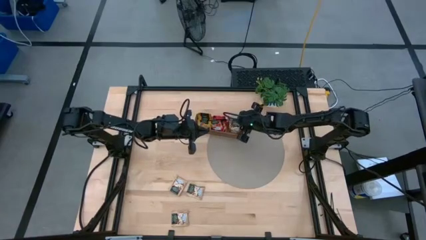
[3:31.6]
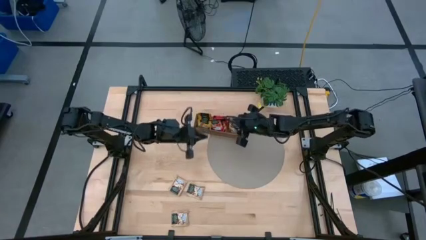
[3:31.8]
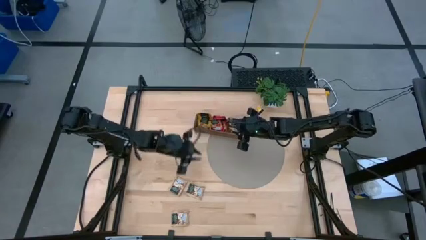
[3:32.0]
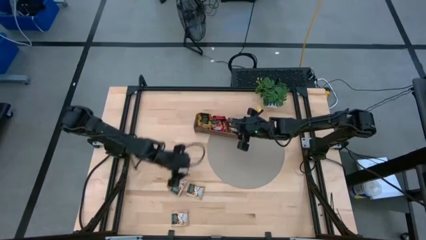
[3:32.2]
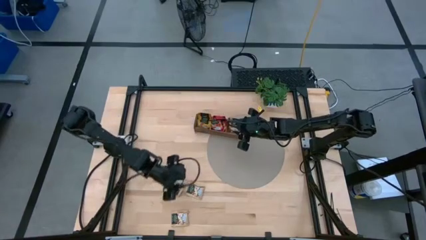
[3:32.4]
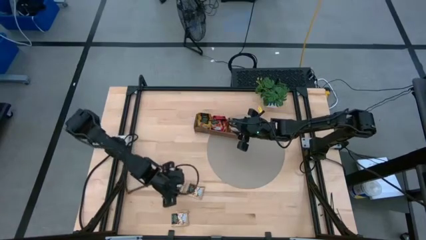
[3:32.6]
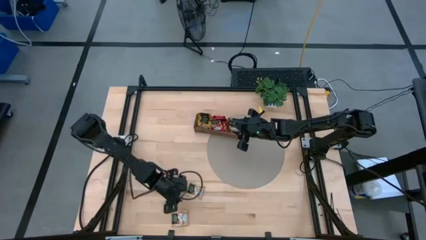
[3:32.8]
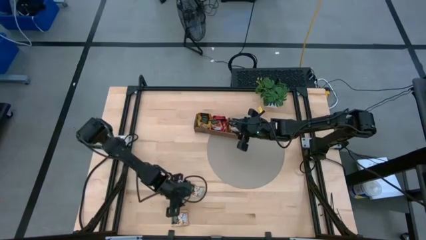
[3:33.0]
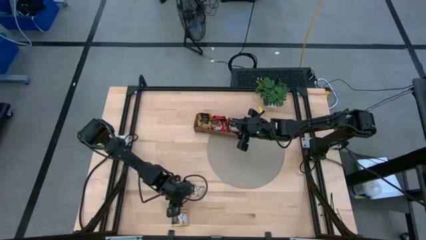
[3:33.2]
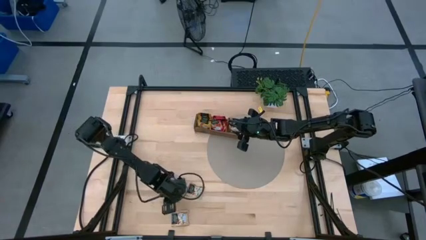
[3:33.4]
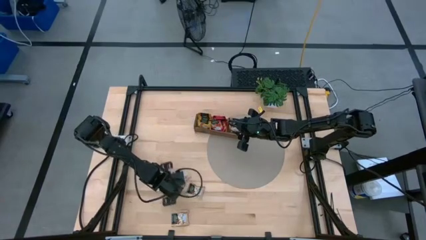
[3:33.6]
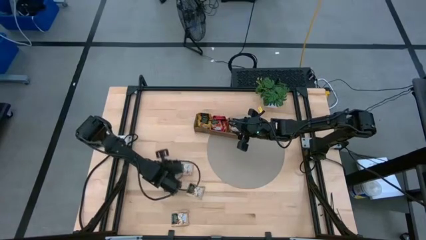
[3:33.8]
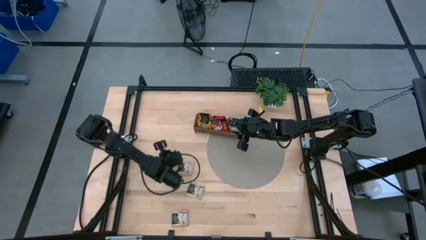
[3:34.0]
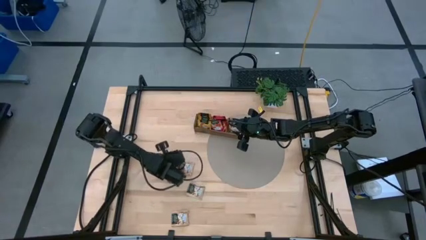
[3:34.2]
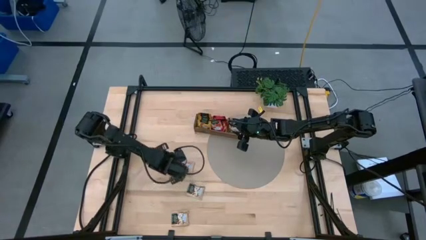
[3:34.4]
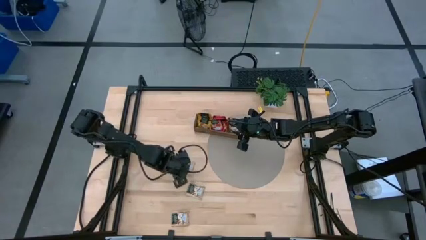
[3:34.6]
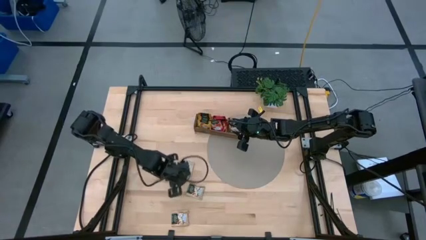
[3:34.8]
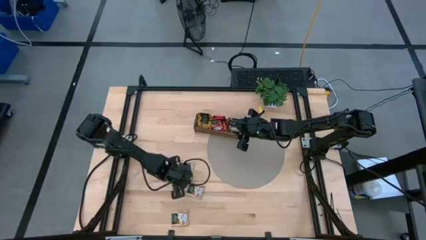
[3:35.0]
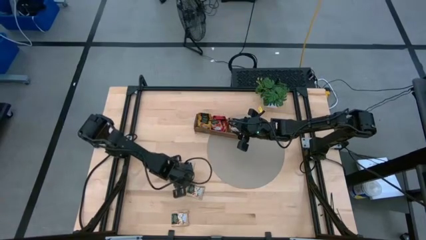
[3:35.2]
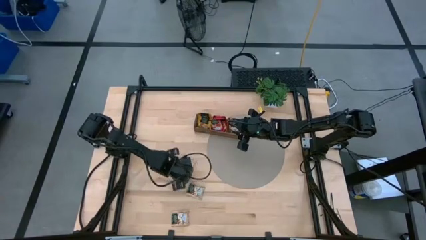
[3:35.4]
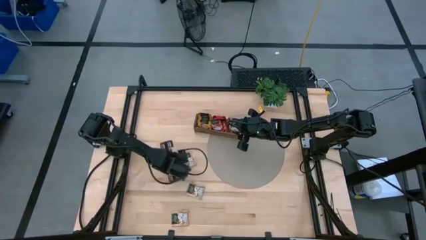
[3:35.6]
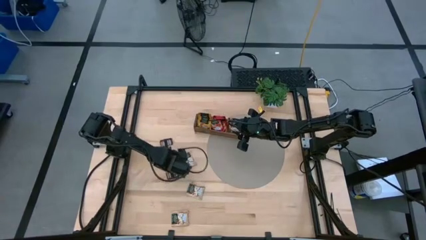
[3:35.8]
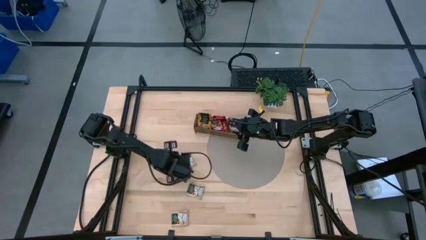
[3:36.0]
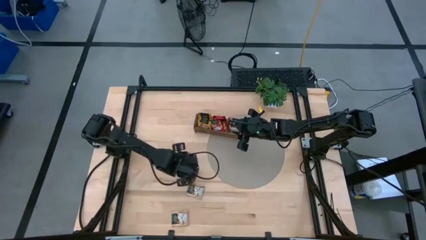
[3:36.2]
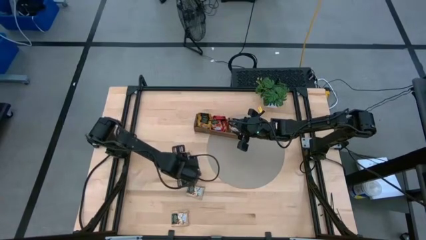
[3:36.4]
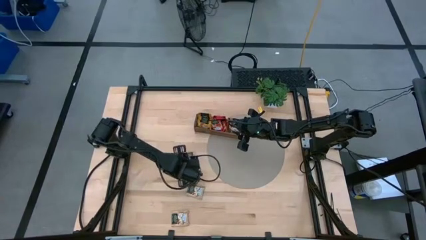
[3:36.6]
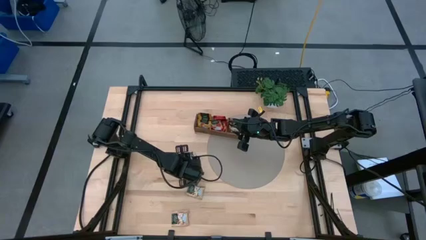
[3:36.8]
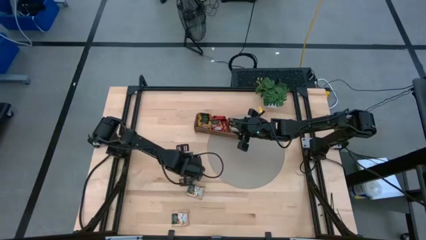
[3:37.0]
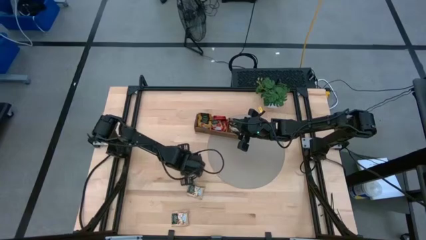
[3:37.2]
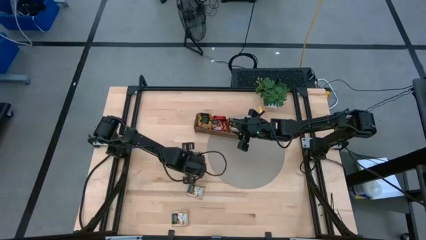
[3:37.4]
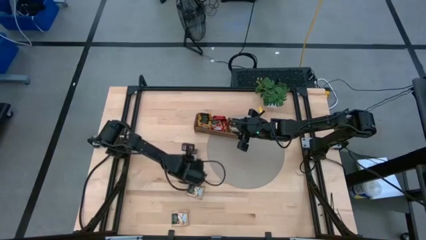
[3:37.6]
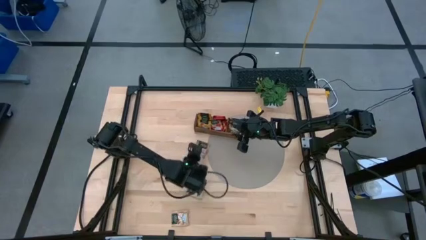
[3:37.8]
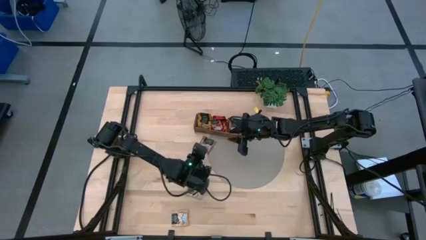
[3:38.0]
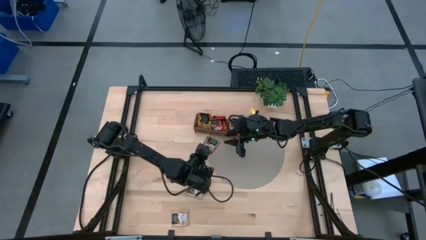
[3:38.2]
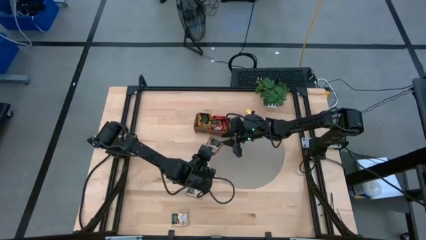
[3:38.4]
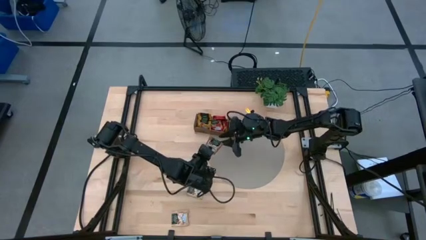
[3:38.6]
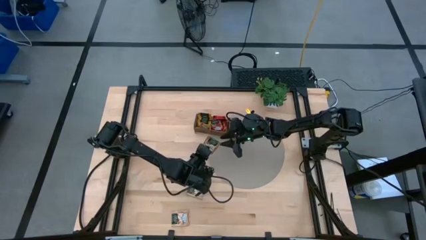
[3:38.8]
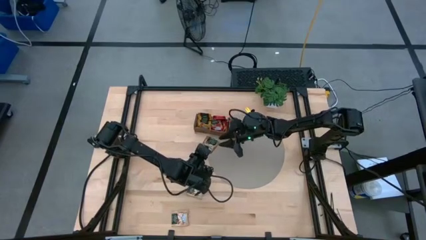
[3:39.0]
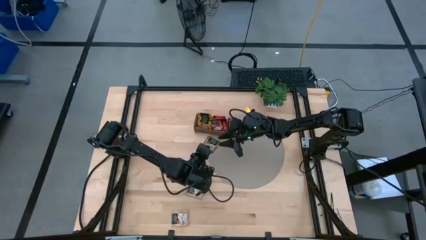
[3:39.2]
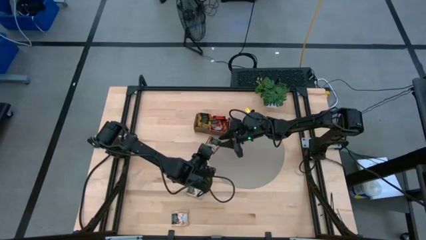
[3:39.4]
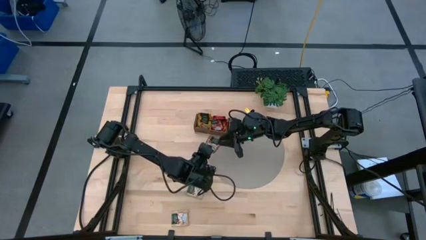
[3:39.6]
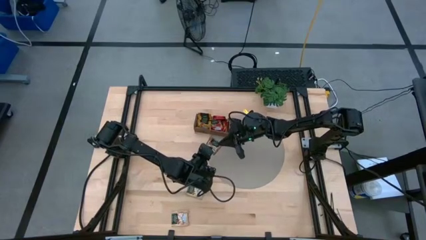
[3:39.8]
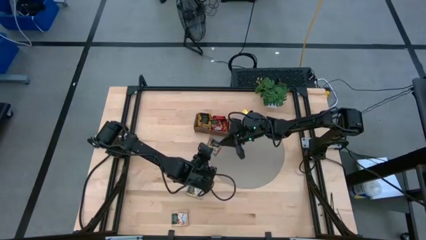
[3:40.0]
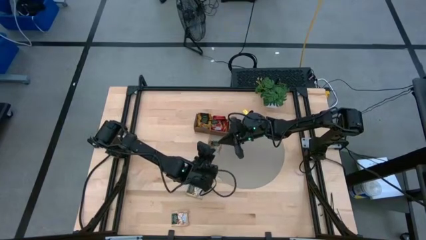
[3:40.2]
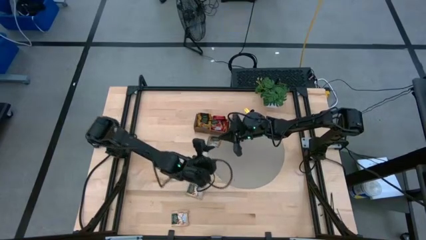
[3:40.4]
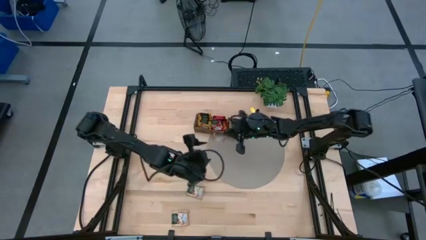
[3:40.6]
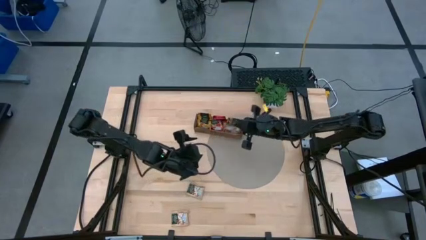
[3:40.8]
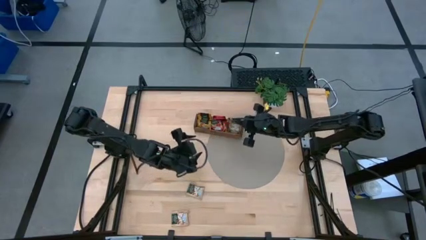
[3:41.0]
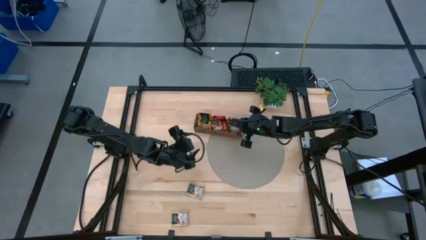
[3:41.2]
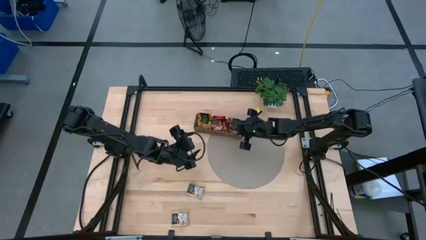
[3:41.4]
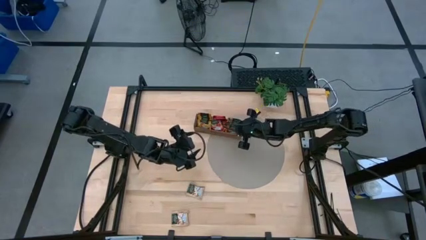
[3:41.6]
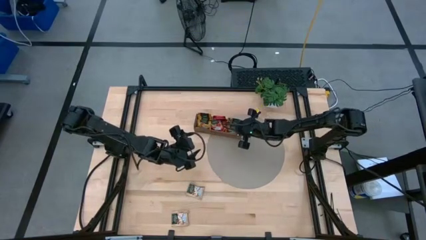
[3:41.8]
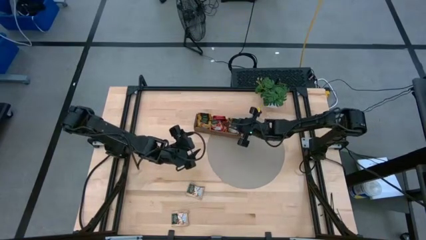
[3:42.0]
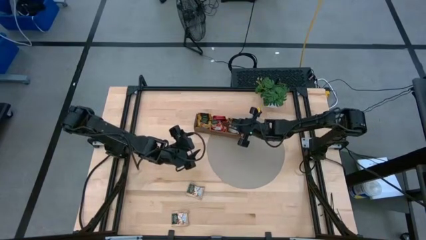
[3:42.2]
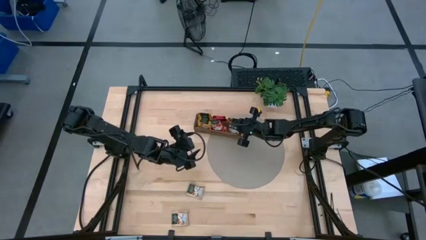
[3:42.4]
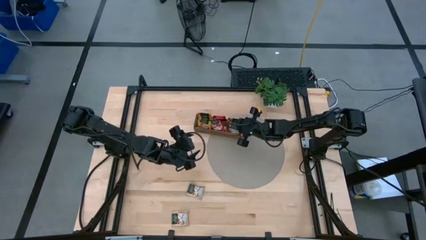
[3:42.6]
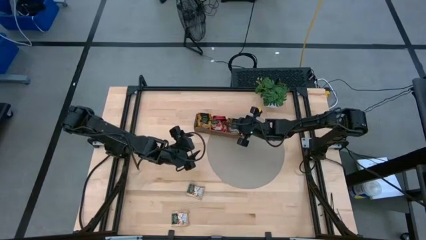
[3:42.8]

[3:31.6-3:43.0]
Task: Pick & Place Tea
Put the brown tea bag into the right section of the wooden organizer

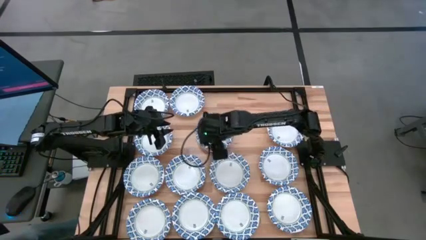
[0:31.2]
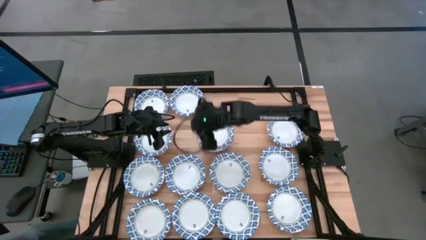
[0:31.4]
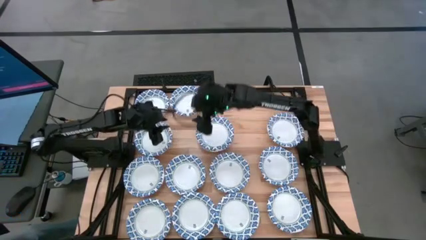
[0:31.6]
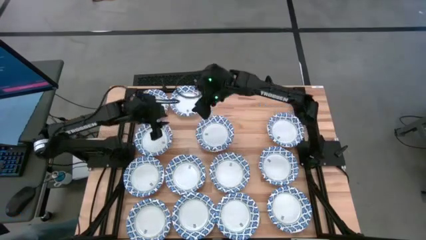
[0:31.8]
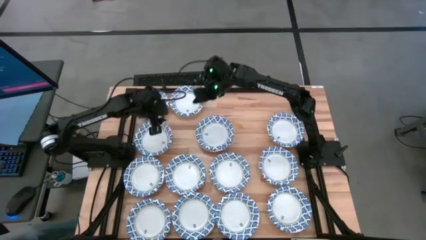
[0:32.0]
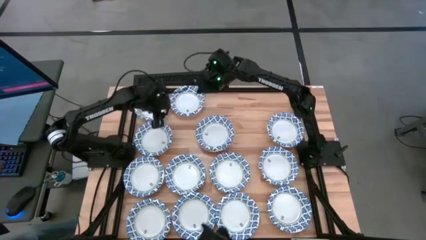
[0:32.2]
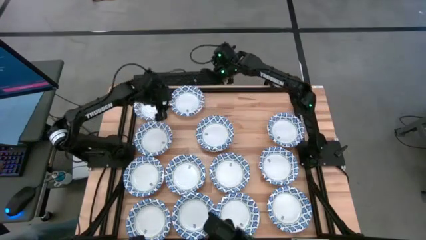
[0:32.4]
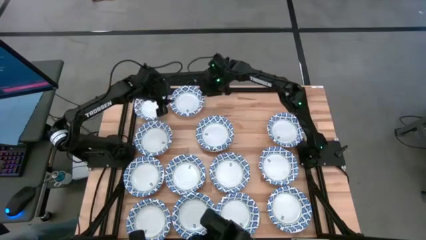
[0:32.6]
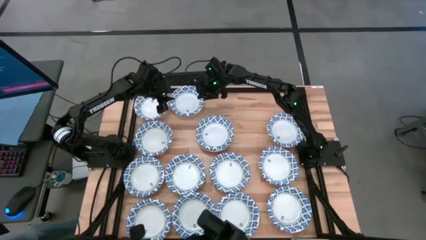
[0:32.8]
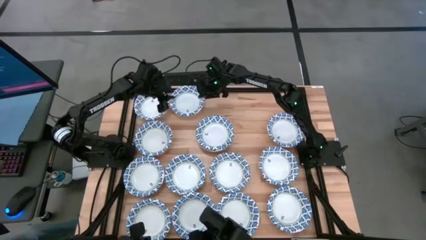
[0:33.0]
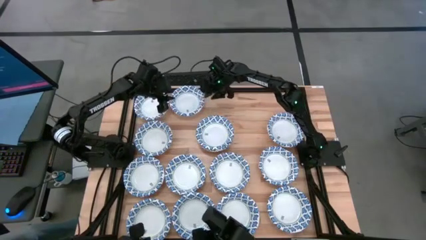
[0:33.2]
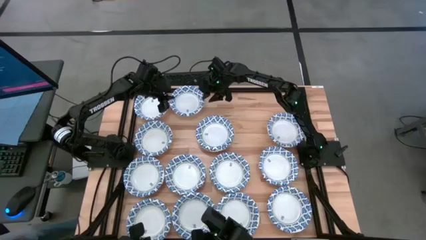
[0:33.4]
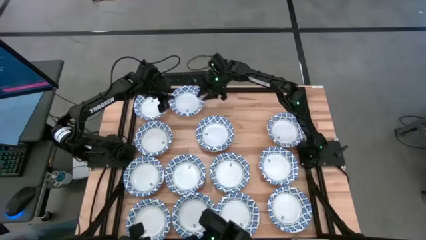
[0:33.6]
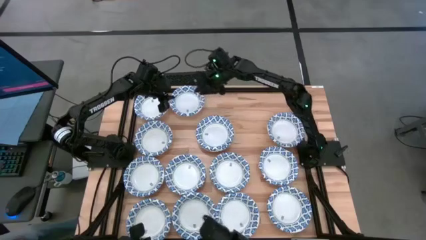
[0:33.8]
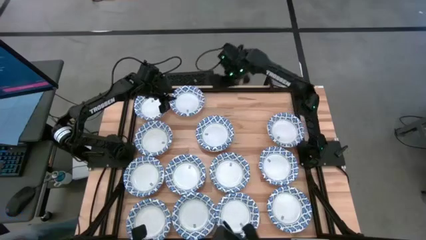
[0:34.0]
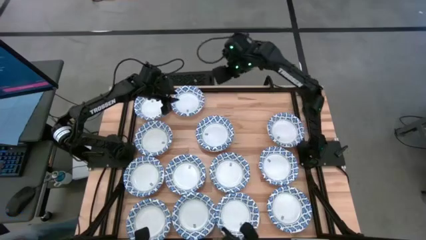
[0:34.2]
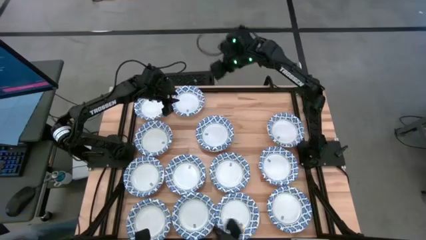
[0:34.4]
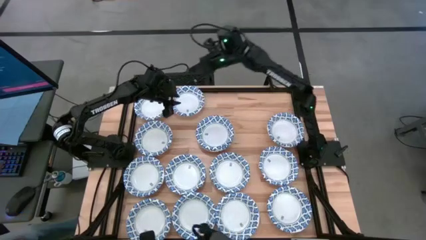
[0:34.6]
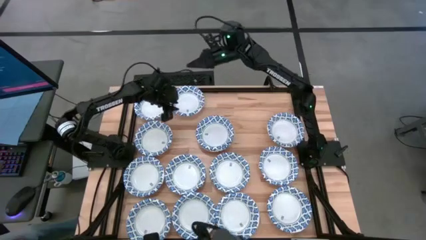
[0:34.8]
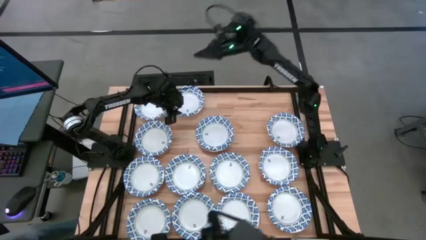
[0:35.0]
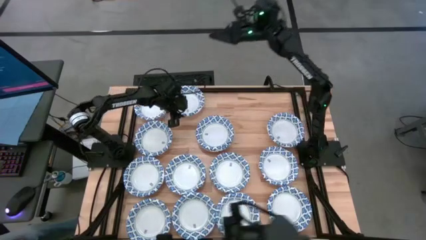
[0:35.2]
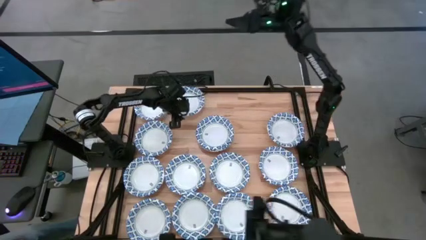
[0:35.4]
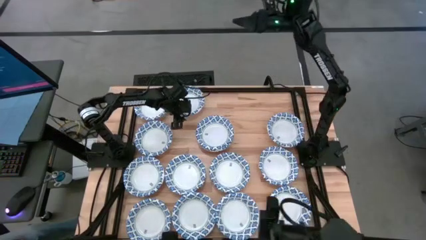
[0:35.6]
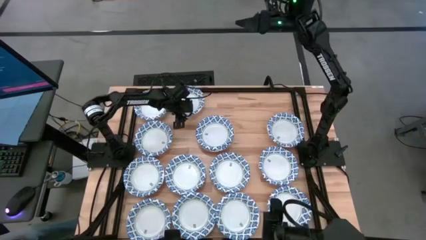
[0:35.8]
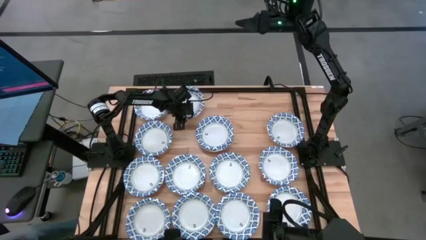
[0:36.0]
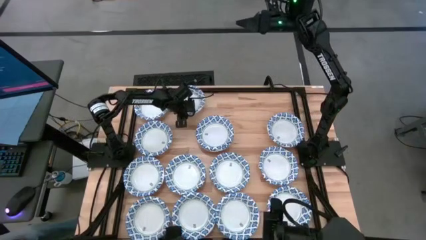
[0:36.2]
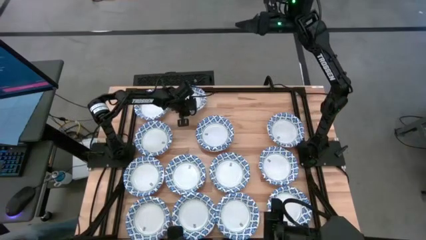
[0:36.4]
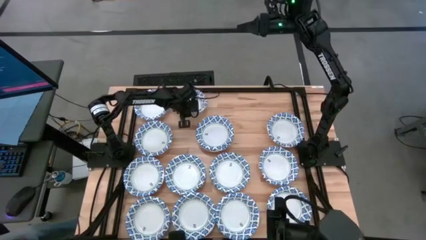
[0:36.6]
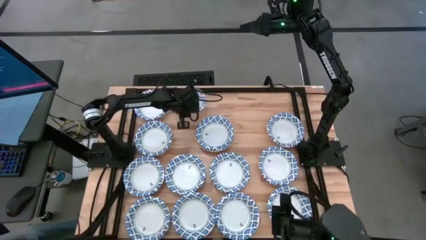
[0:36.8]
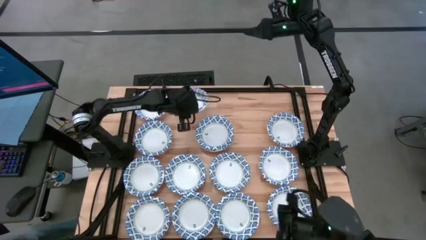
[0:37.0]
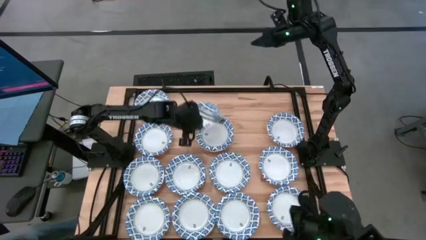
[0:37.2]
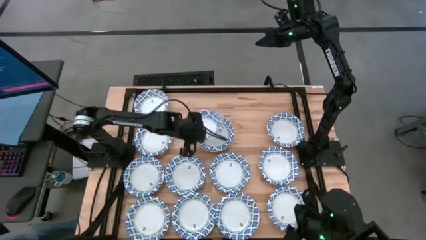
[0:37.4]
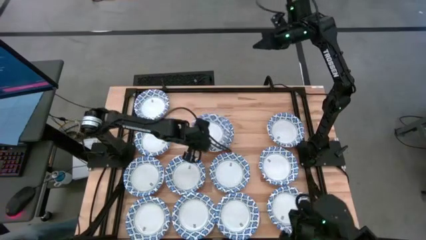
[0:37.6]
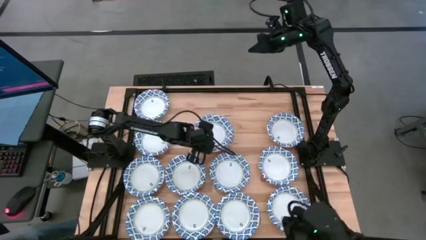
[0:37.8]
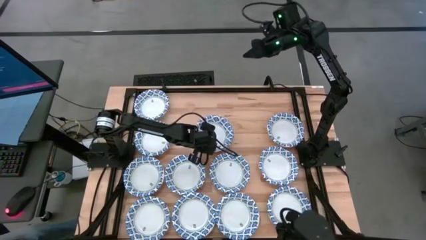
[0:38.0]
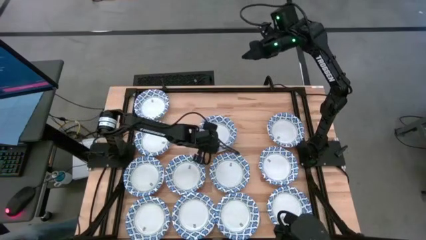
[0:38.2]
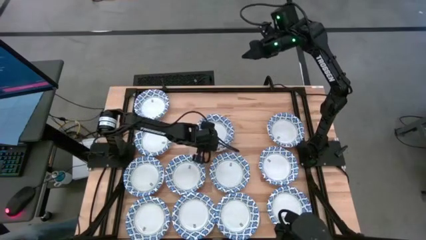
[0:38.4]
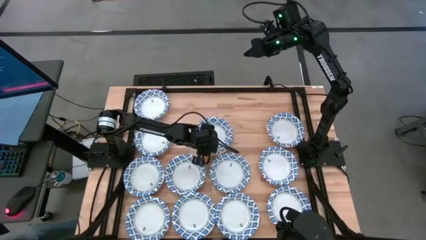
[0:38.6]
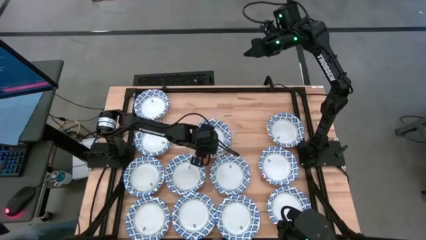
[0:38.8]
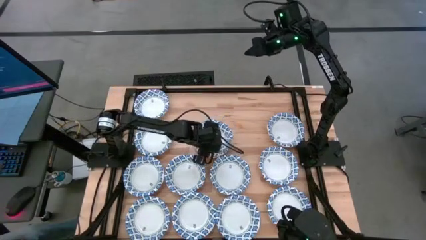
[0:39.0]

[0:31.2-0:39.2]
Task: Nest bowls inside each other
Stack the blue bowl on top of the blue bowls
